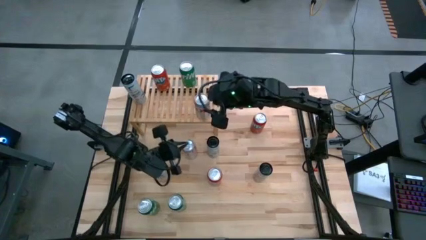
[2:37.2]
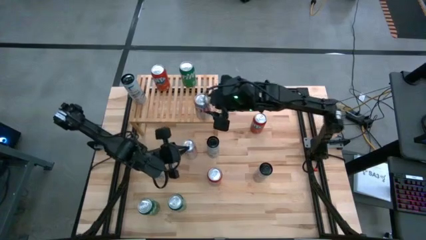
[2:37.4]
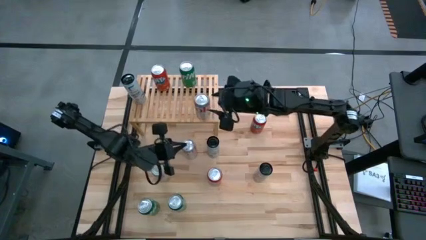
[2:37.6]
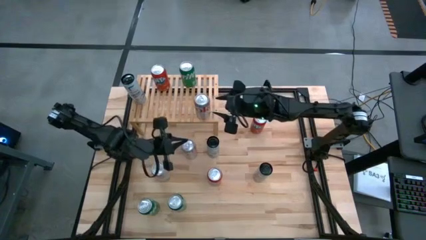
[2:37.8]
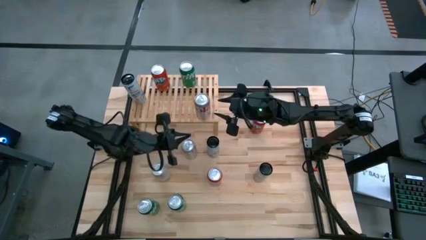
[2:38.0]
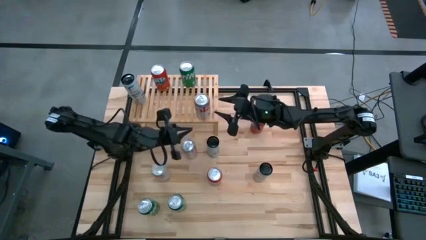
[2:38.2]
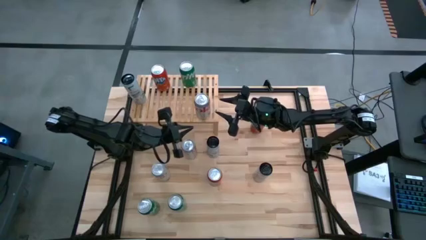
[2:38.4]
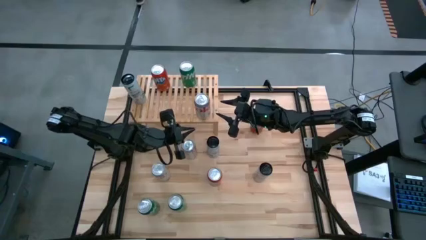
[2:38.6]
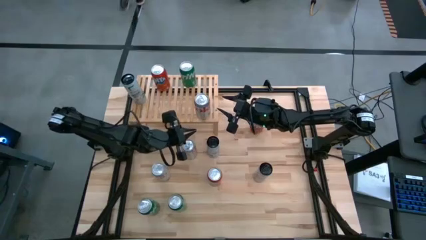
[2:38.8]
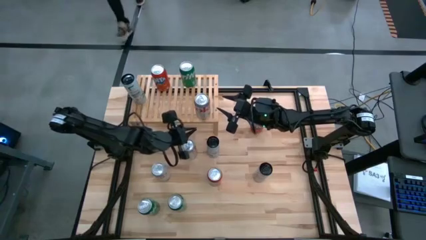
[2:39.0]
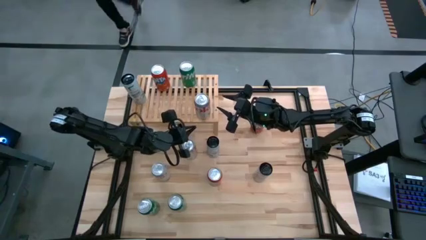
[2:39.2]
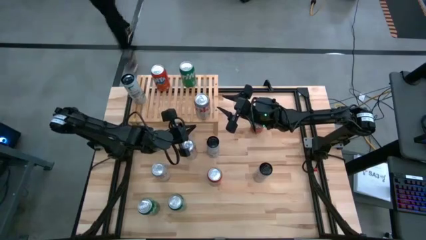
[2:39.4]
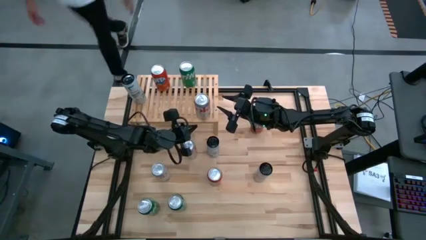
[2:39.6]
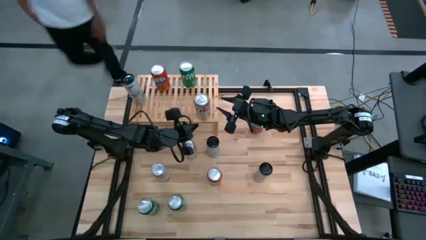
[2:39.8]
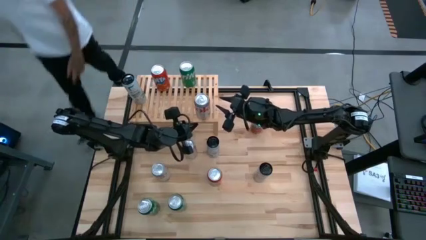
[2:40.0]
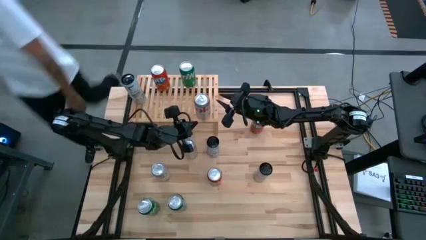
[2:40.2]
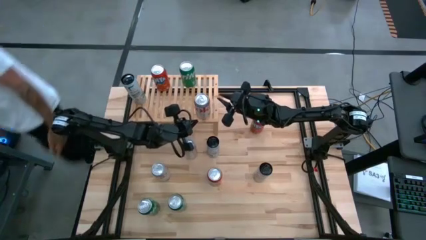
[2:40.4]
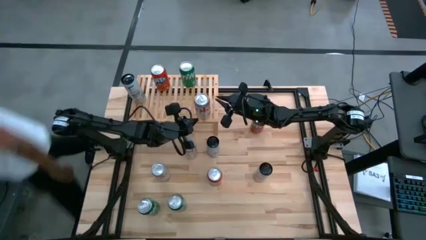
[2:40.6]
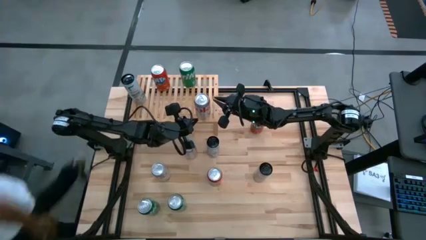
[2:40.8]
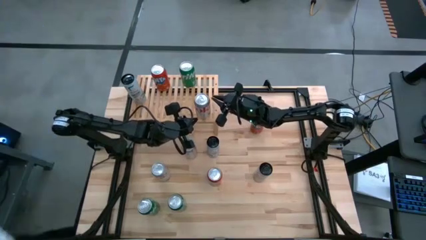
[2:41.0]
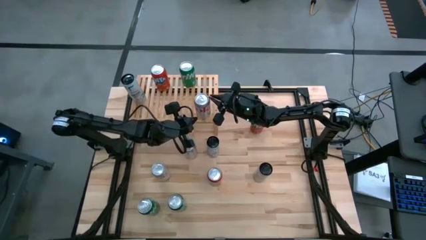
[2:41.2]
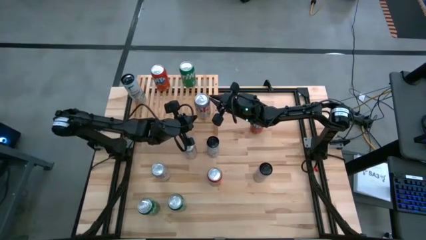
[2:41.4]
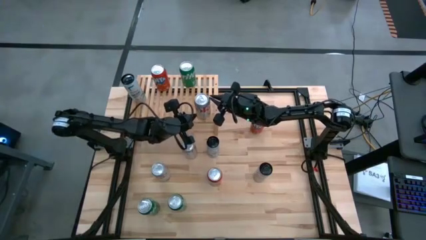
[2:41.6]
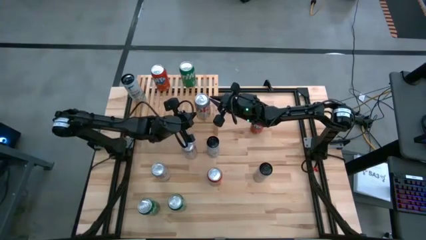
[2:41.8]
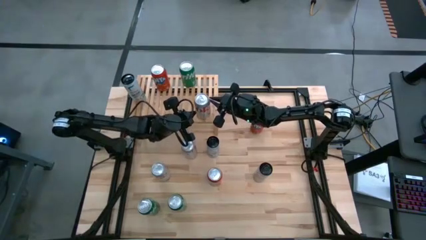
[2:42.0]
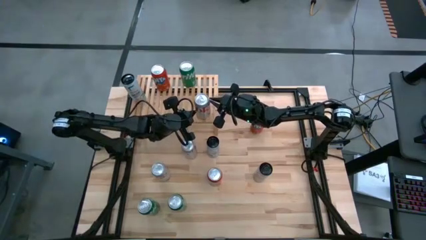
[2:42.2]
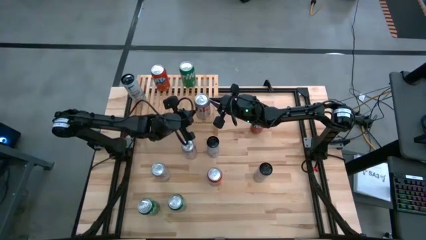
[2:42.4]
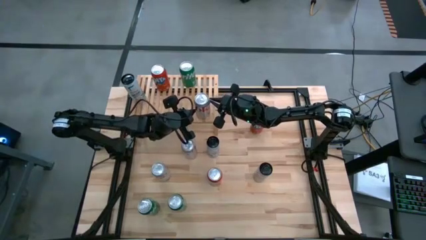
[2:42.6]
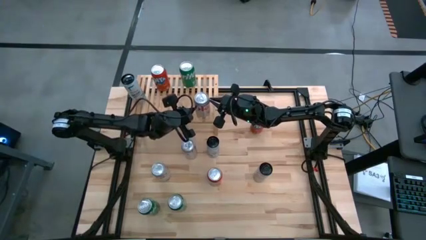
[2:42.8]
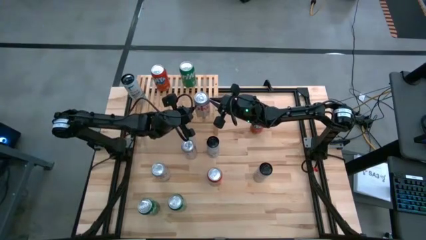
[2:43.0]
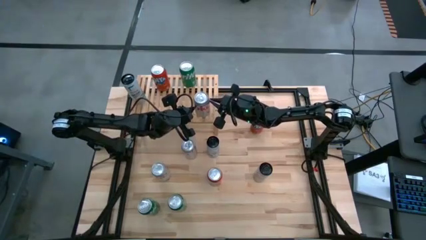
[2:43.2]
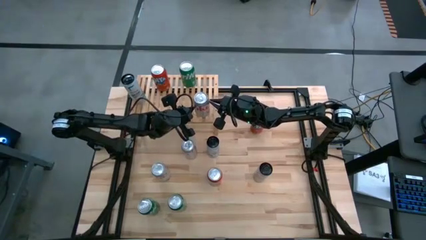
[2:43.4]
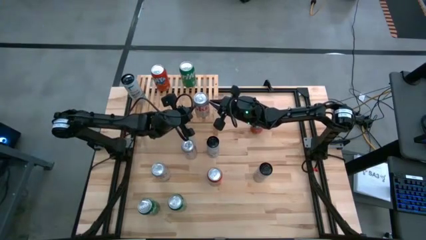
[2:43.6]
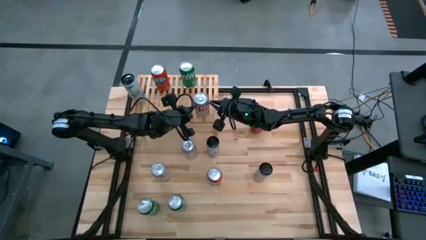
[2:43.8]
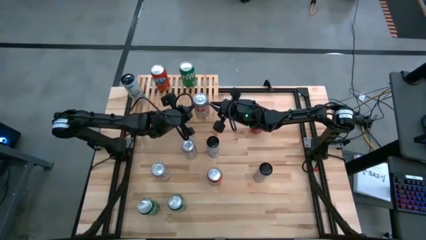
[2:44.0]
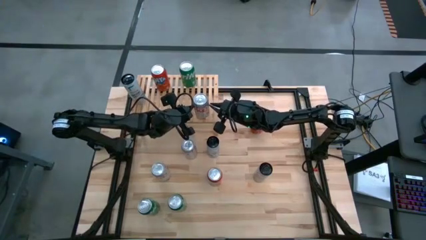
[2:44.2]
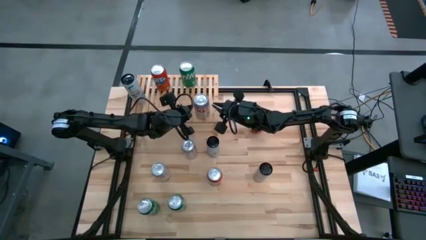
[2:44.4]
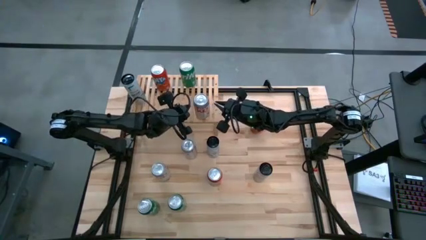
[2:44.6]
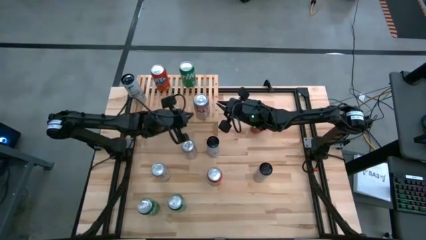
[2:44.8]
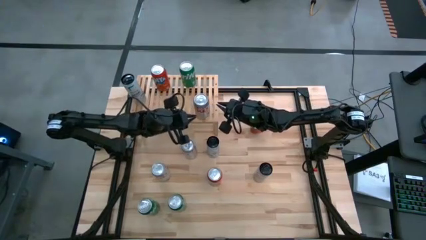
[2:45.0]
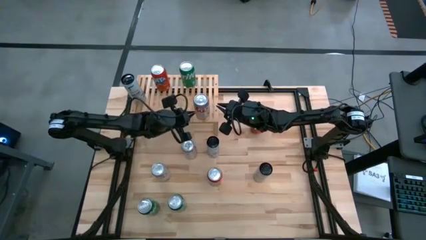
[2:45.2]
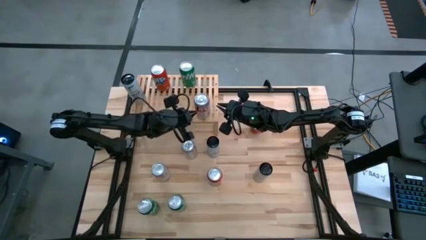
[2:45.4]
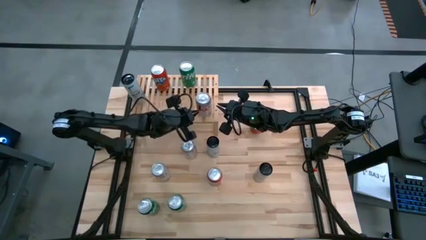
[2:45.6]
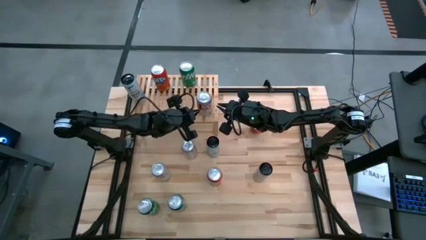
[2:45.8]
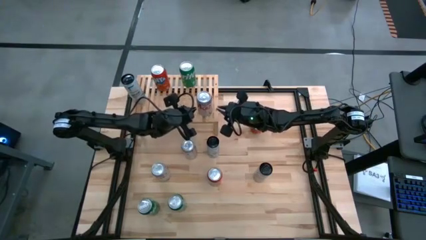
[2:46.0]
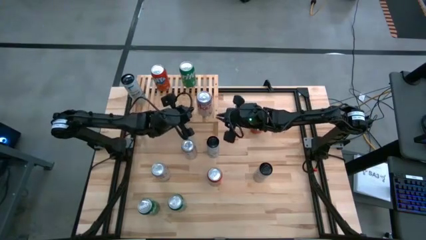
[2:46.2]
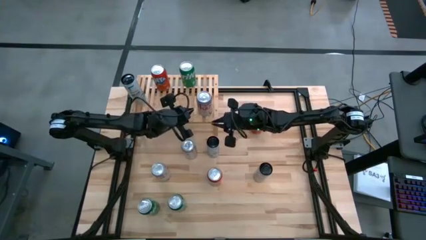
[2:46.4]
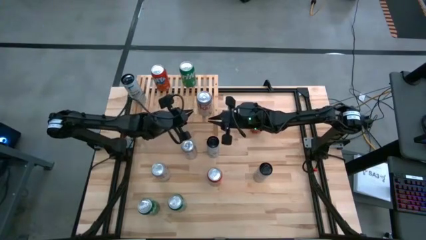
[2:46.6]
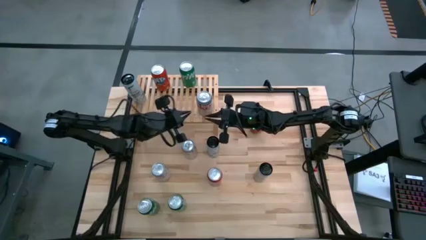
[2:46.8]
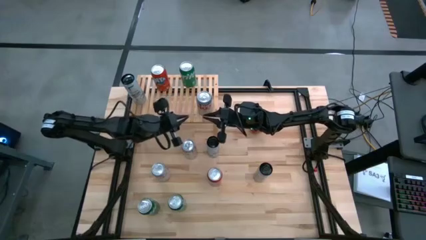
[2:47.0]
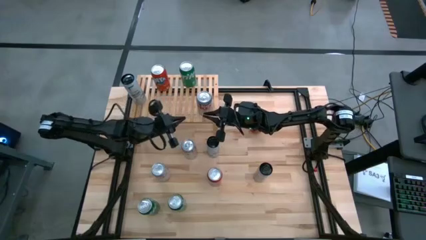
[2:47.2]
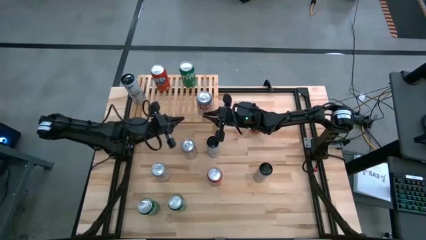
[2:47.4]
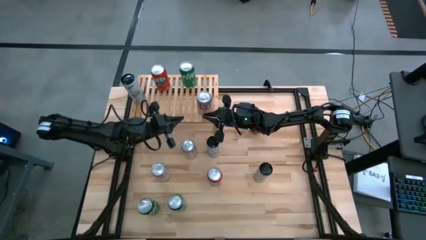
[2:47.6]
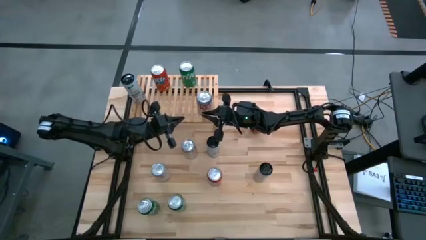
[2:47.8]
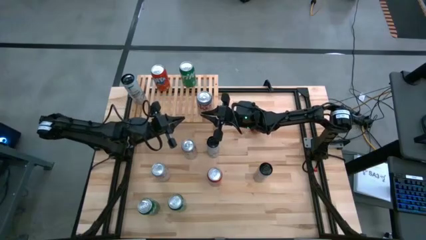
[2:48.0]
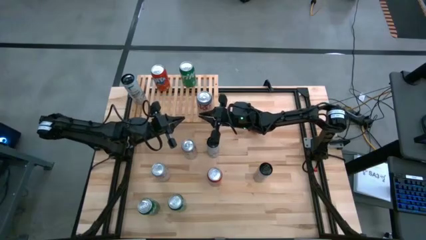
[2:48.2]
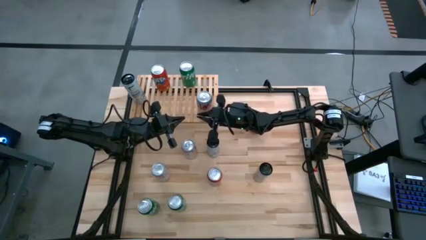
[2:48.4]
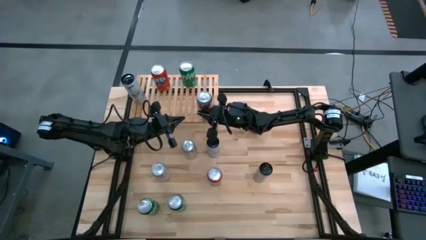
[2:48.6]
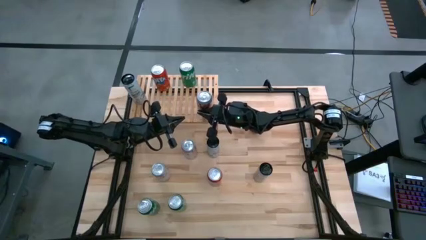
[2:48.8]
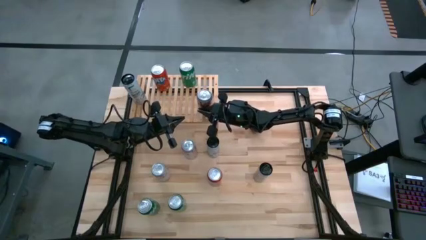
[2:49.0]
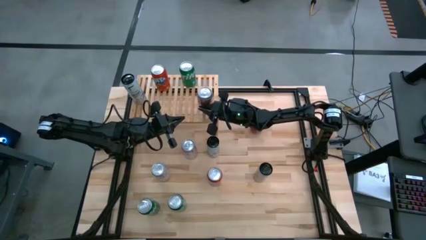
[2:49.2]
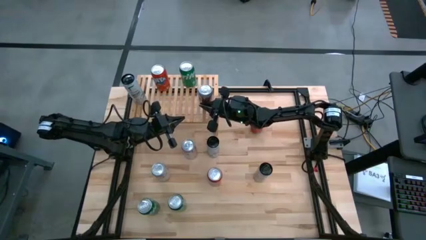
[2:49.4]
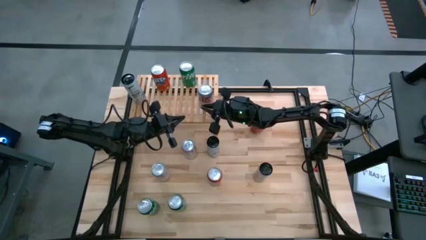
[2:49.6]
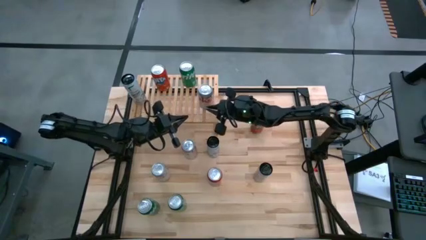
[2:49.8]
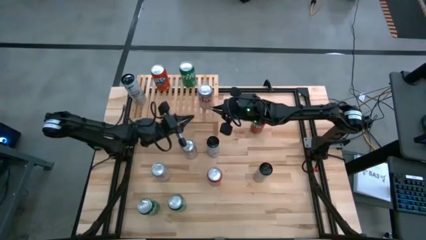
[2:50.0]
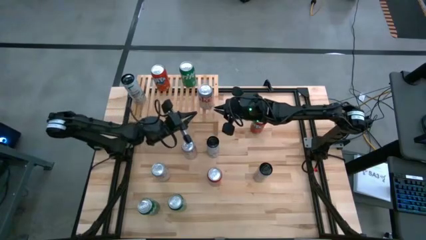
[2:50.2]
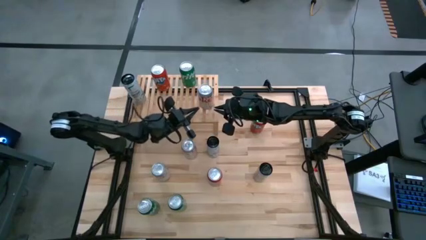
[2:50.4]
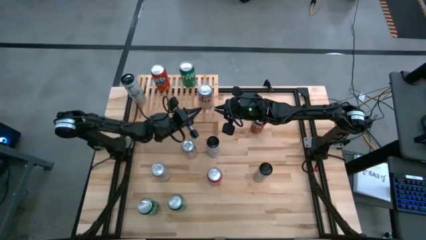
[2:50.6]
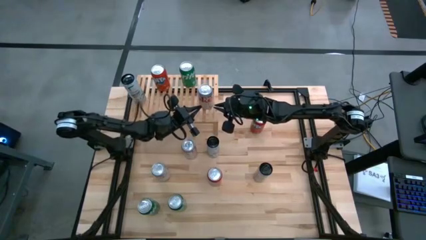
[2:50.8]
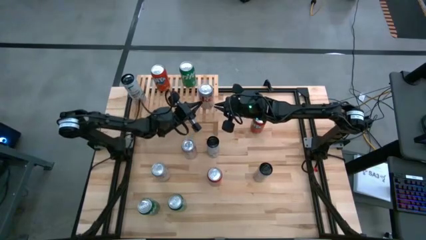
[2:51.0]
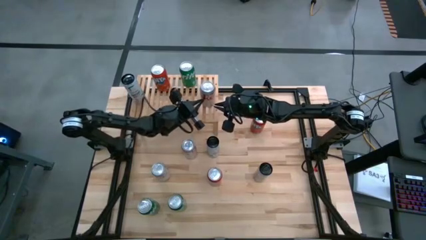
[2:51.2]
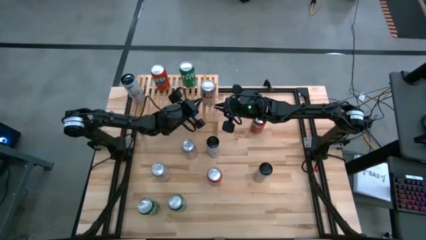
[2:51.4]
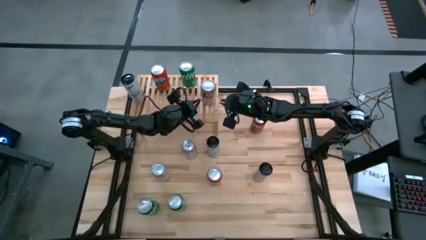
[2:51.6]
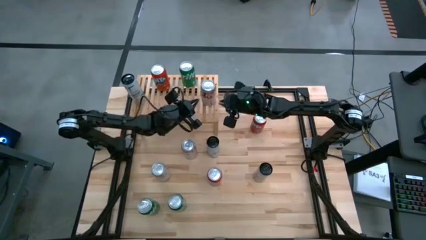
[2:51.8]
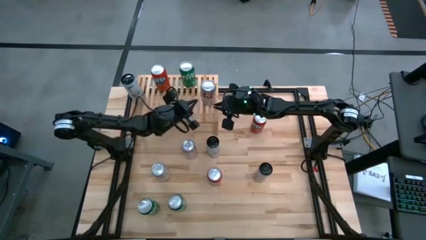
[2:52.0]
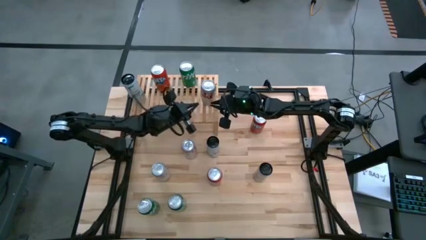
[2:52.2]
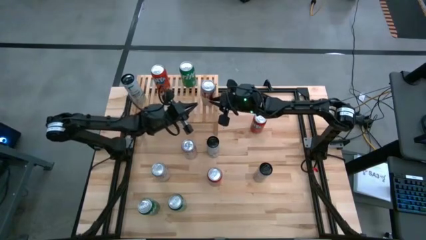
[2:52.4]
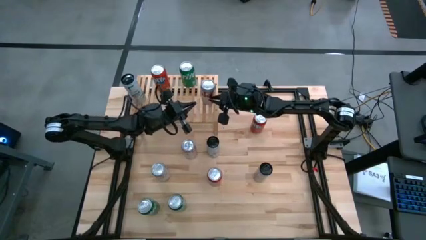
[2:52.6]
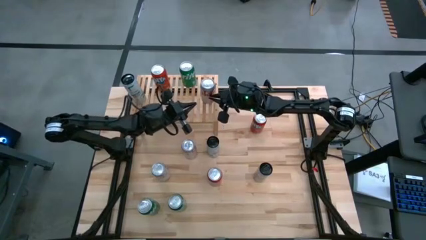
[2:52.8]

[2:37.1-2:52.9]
Task: Place canned beverage on shelf
Put the bottom red/silver soda can on the shelf
